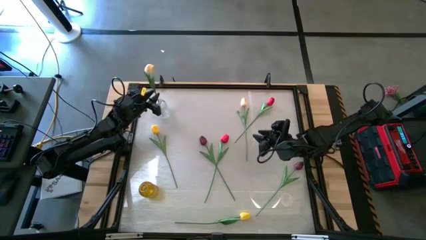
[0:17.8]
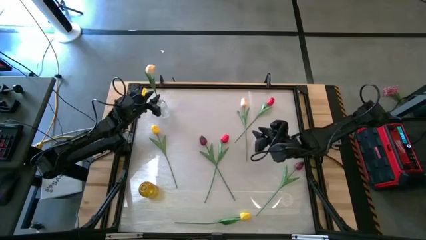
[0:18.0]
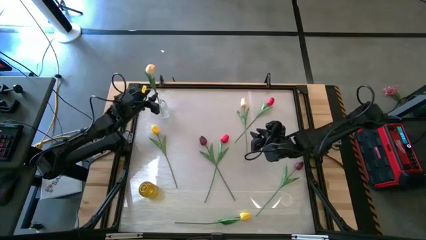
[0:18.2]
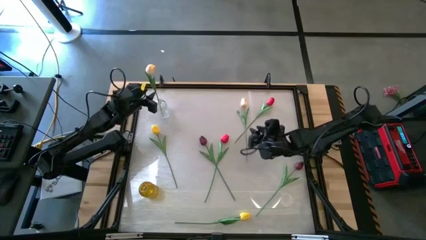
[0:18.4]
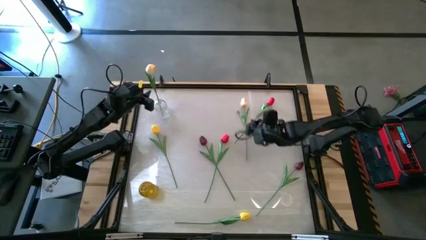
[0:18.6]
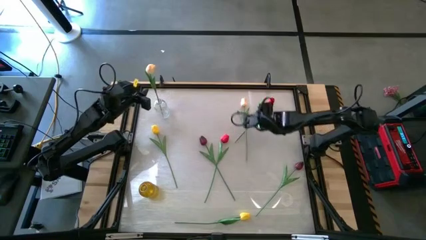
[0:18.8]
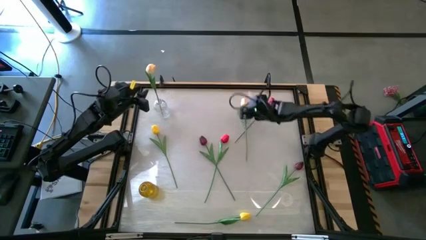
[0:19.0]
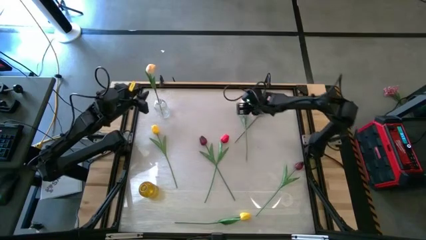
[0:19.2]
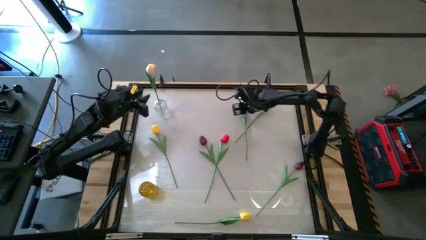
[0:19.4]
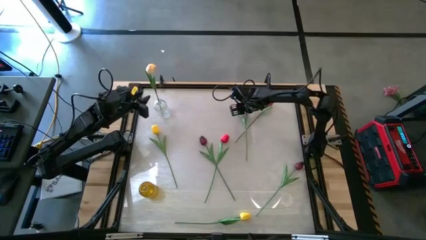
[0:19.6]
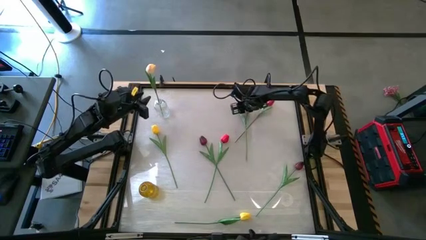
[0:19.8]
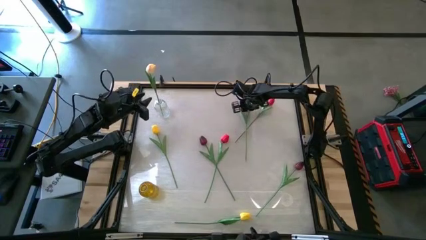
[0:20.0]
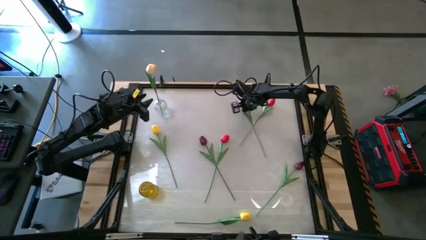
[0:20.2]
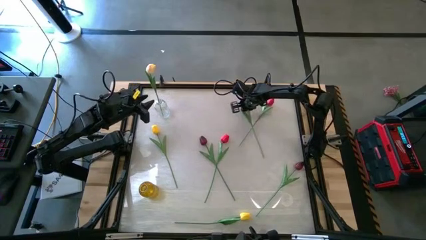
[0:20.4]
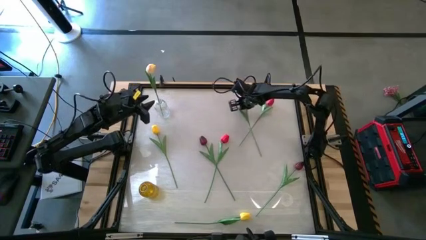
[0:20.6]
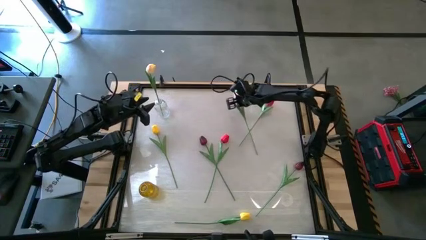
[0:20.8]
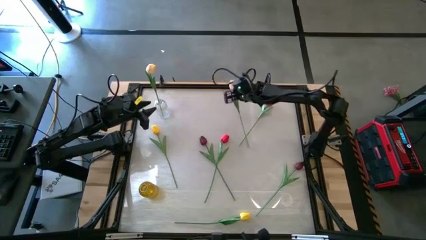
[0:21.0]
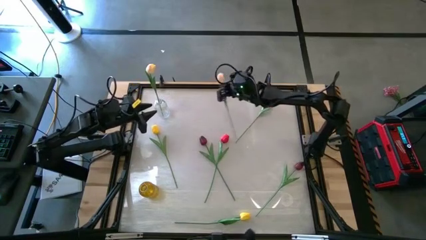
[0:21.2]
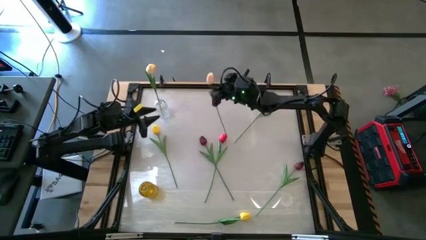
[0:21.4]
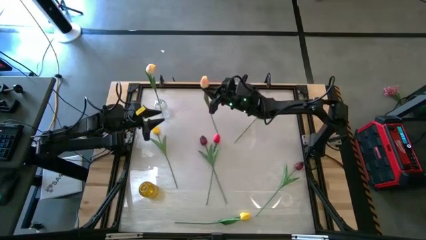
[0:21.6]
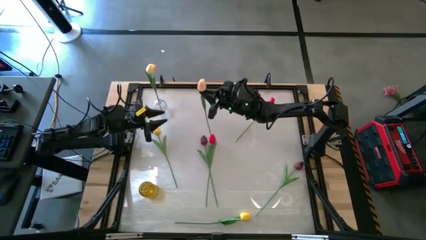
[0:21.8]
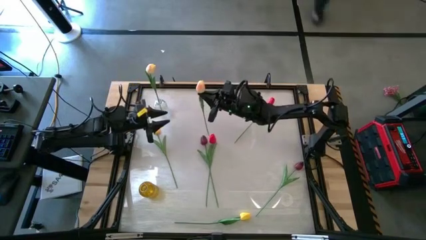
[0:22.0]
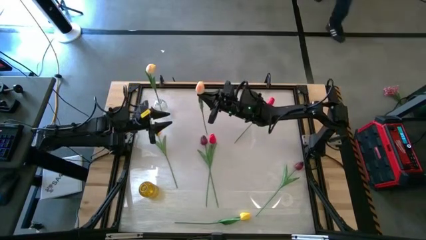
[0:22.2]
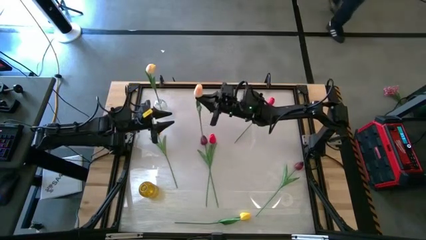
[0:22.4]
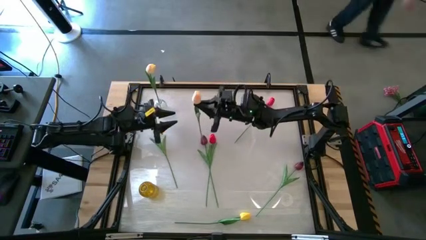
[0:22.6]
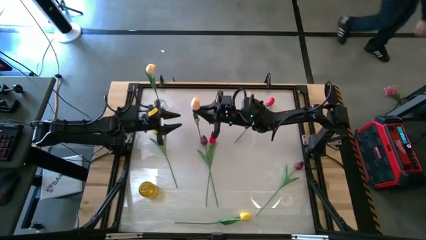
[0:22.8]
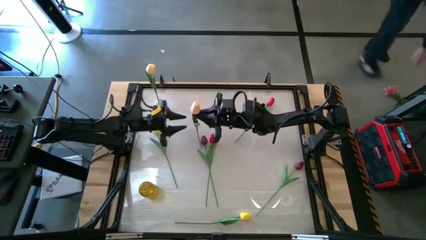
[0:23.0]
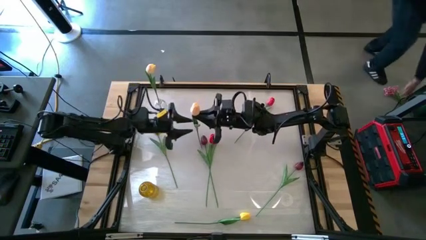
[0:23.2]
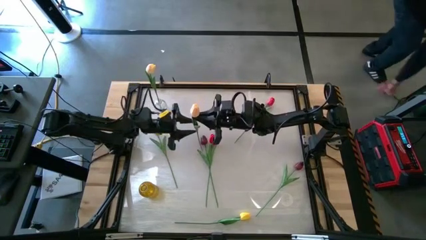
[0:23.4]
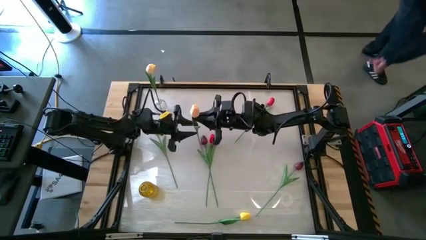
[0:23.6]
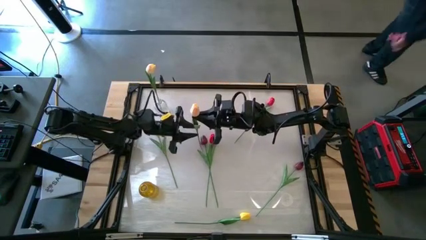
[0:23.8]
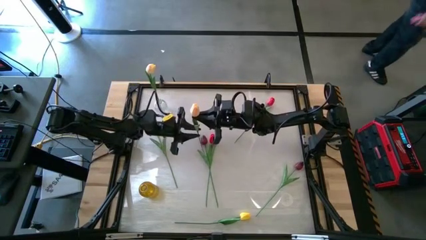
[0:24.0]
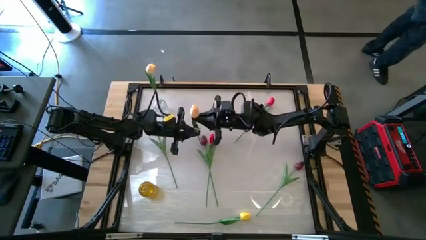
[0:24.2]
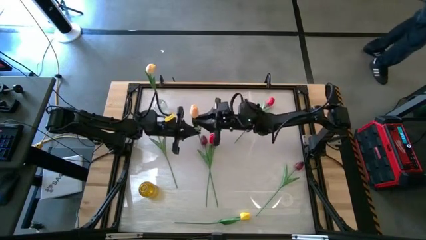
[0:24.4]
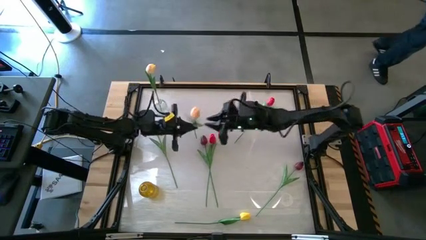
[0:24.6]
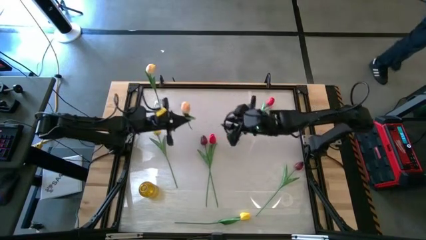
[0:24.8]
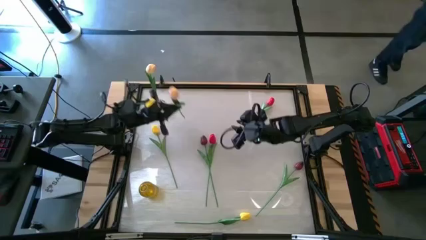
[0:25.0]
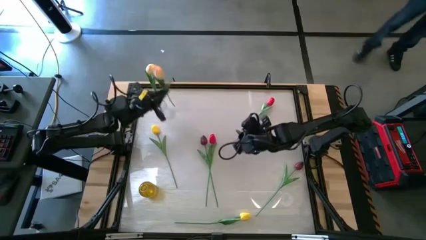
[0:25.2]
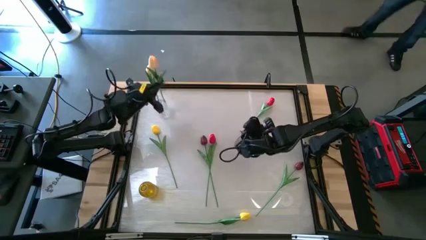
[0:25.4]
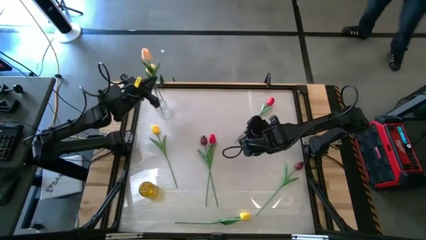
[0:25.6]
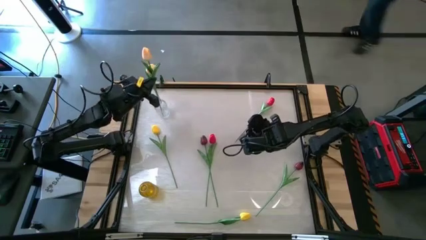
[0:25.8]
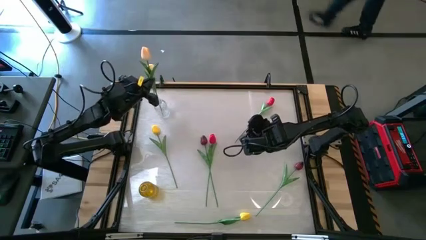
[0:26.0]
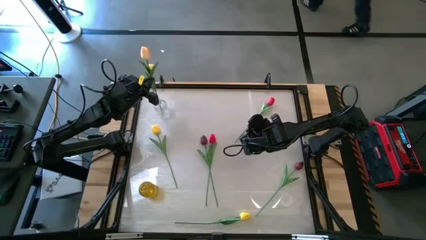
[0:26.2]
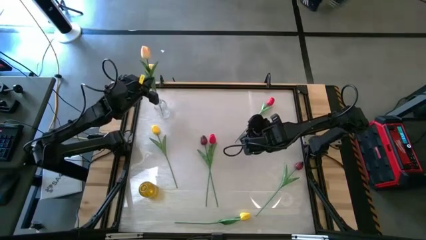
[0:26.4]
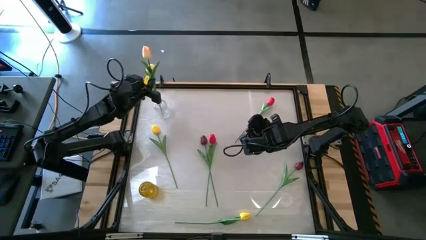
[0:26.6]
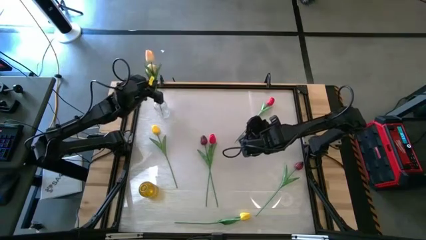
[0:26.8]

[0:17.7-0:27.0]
Task: Sort flowers into vase by color
Put the light yellow tulip into the transparent vase

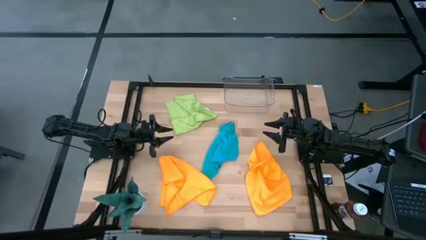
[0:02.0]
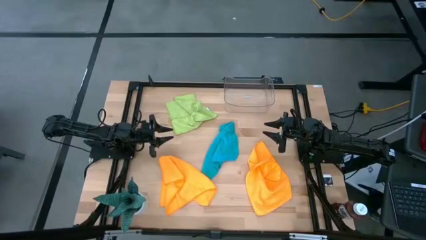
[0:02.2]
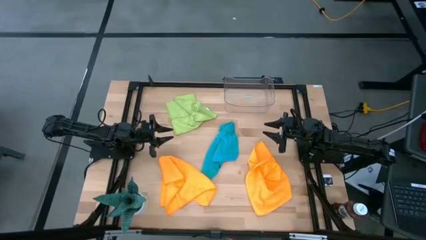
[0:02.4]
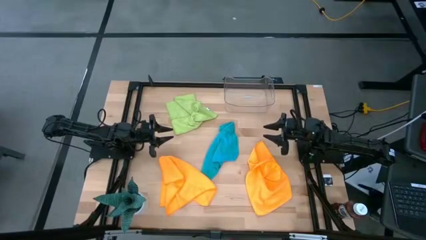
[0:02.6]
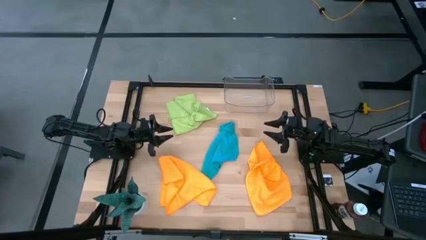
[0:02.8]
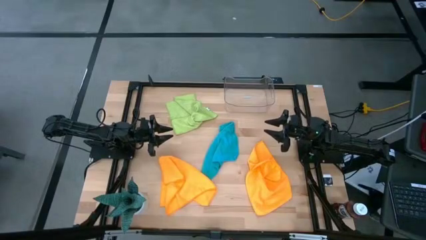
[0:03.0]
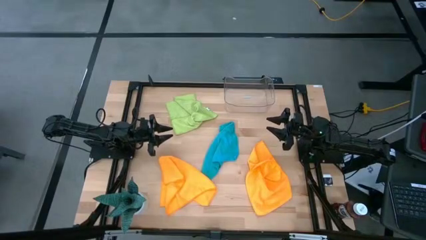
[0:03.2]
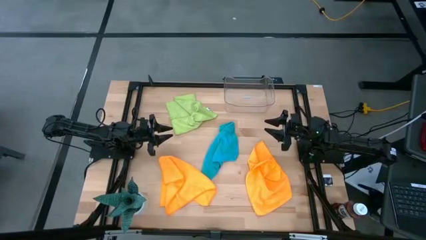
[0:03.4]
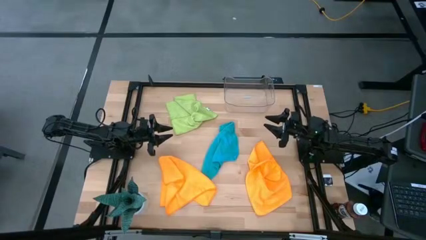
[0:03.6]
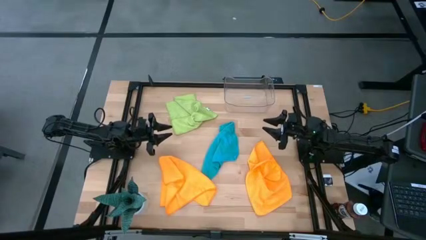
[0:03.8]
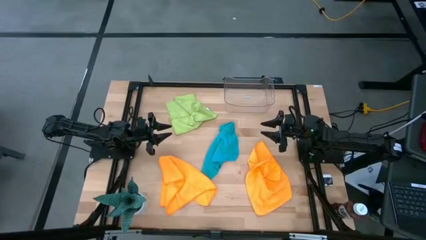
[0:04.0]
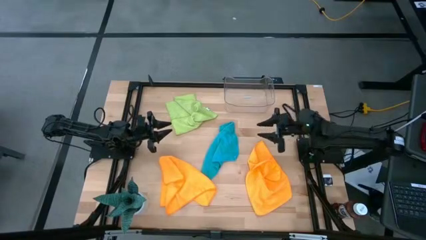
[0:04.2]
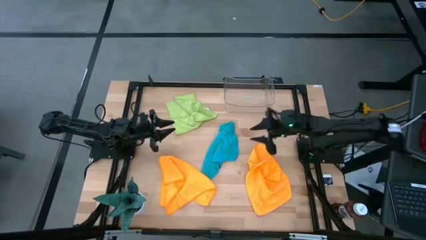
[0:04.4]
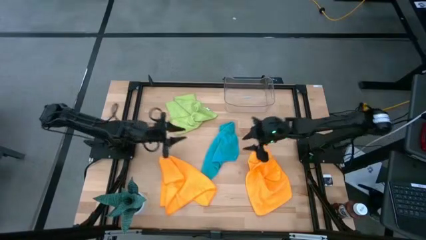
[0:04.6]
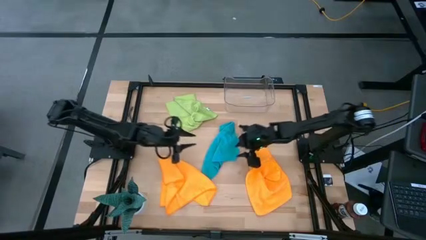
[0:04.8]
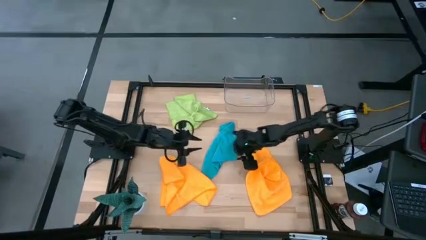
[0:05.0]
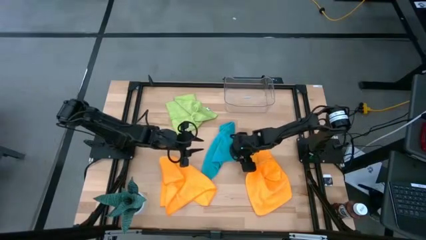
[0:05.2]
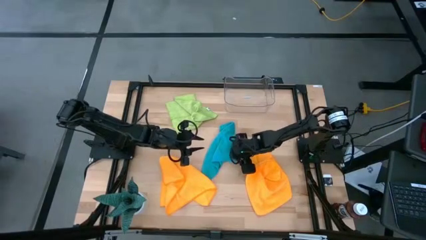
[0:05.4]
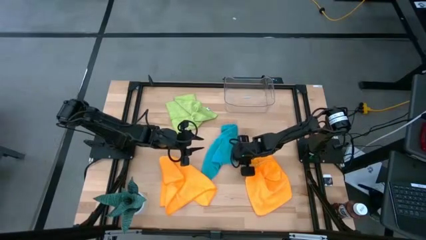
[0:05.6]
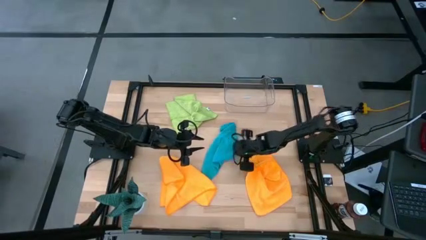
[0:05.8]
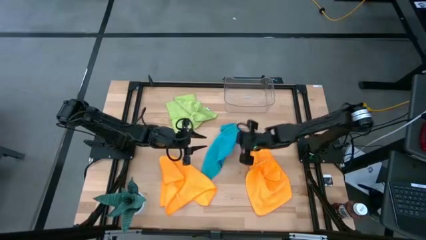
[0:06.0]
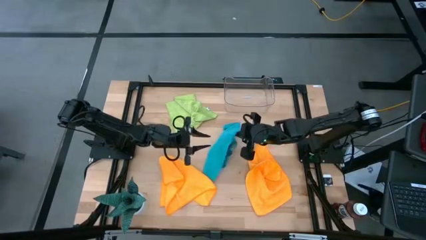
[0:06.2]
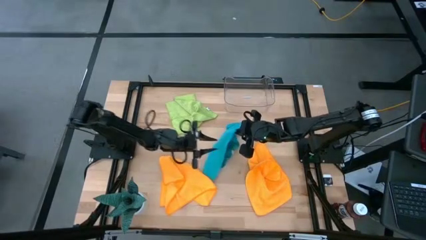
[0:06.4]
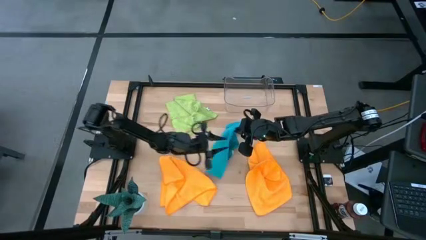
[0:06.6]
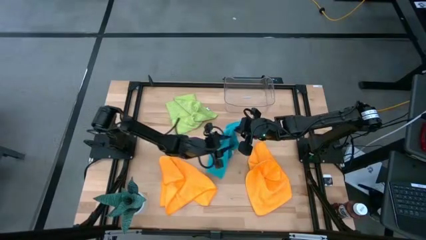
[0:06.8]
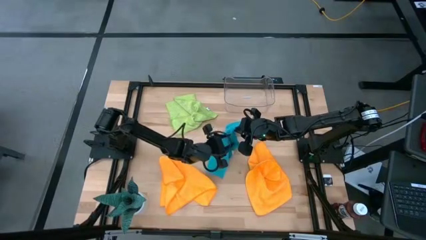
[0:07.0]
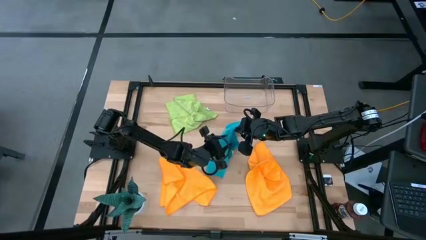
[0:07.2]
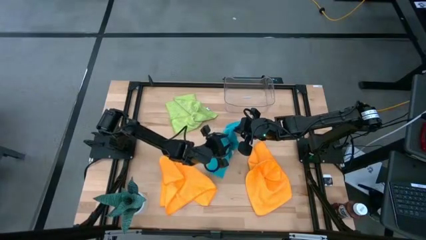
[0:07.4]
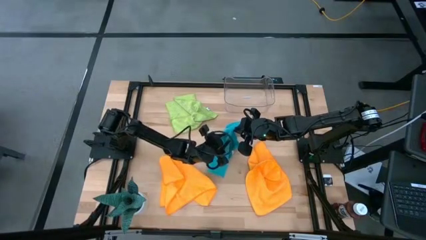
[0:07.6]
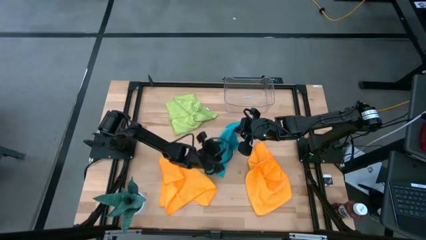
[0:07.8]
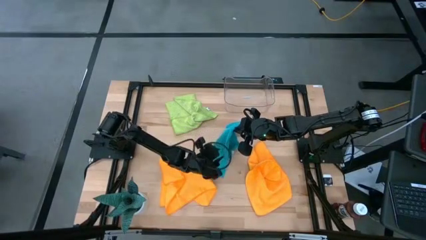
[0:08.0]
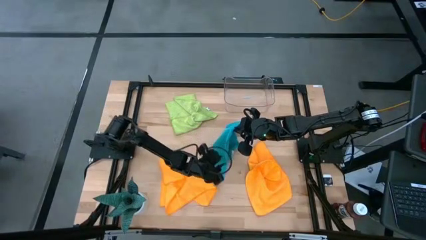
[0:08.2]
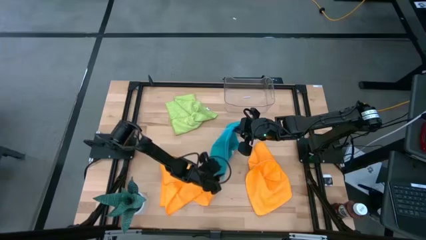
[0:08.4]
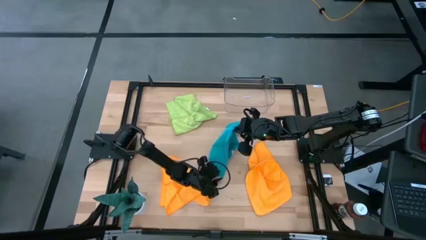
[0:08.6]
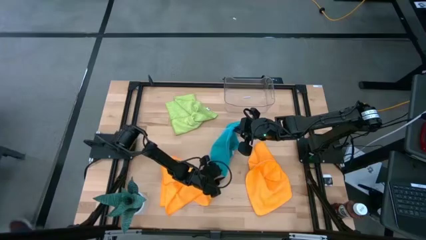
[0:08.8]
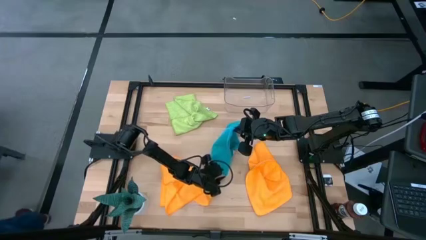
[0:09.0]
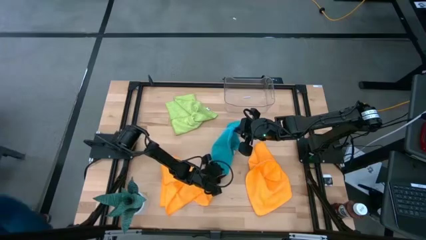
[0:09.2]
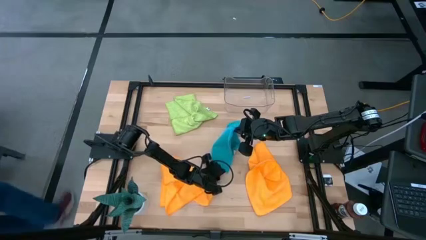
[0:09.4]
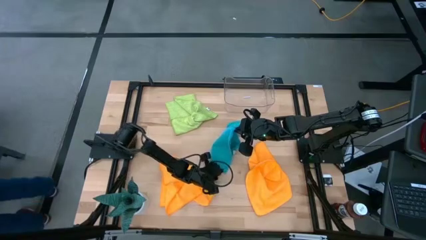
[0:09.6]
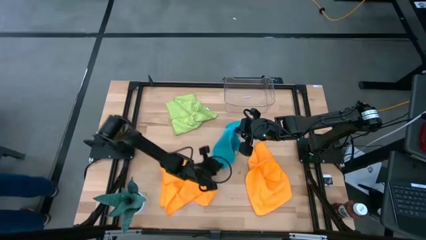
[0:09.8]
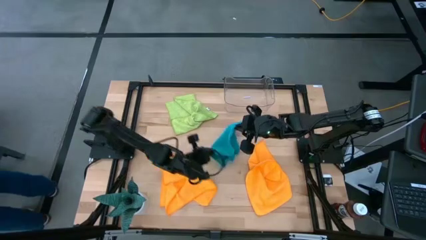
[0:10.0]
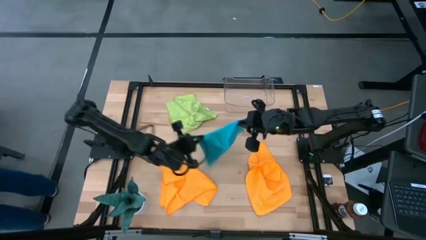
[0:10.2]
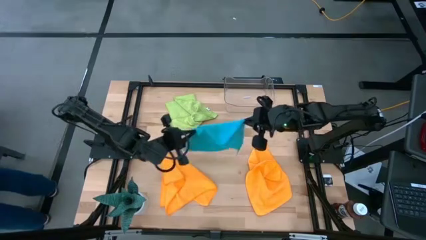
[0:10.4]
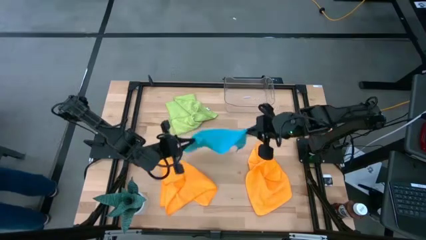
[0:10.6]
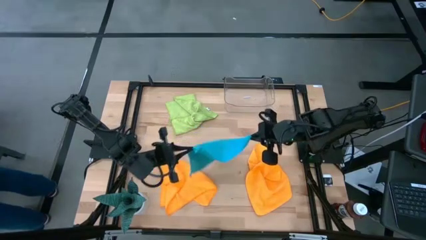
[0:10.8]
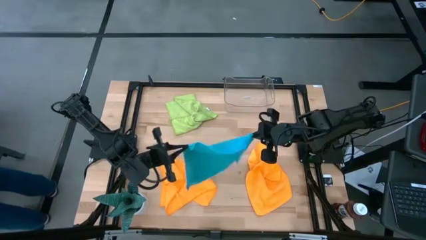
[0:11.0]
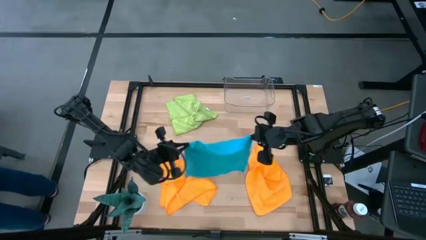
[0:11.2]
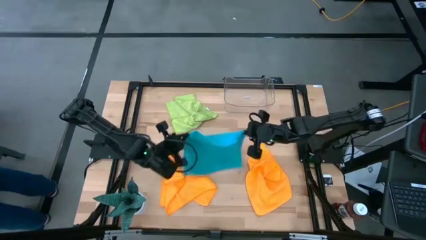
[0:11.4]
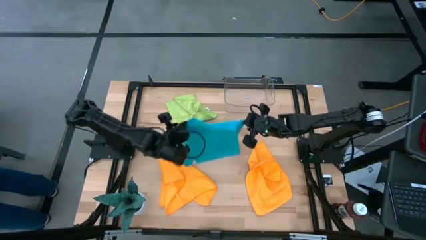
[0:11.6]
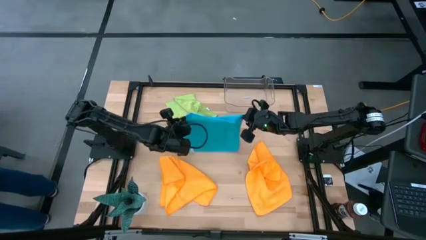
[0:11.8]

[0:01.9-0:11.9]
Task: Fold microfiber towels
Fold the blue microfiber cloth
